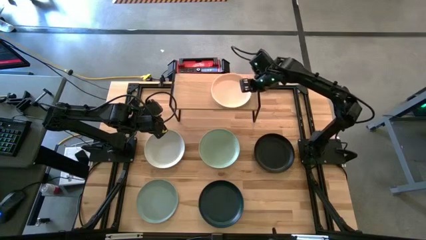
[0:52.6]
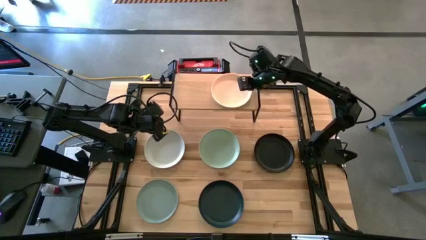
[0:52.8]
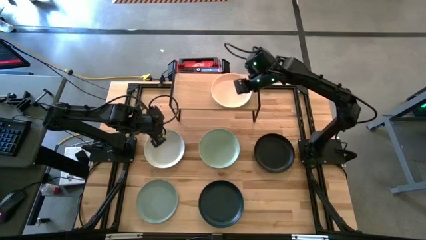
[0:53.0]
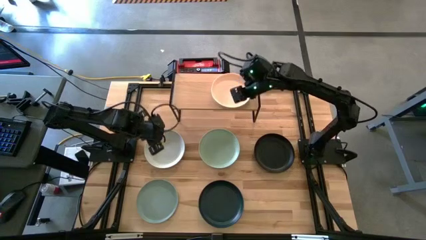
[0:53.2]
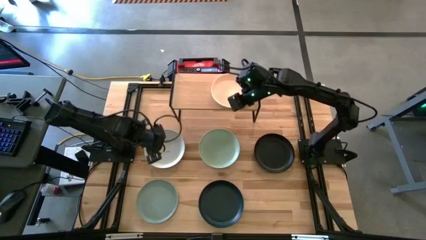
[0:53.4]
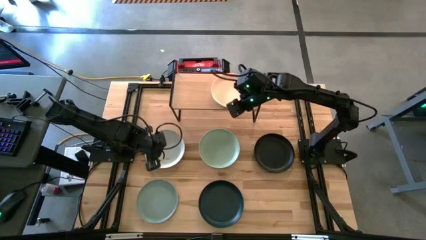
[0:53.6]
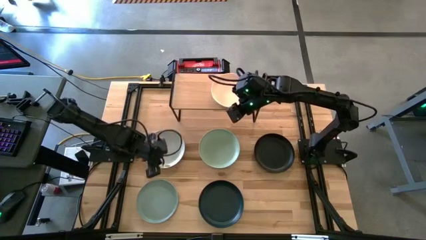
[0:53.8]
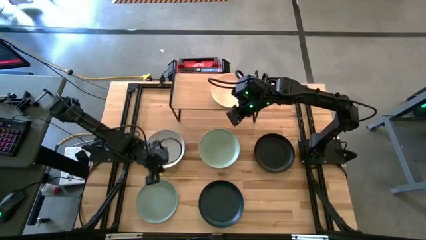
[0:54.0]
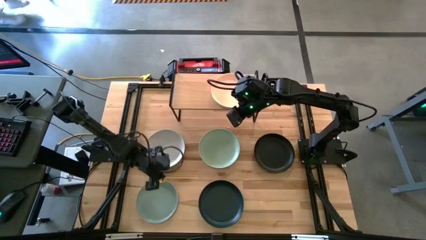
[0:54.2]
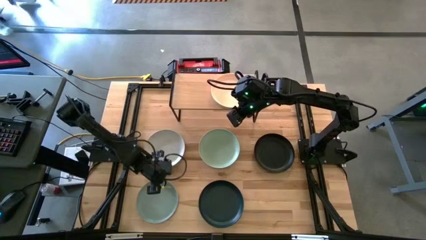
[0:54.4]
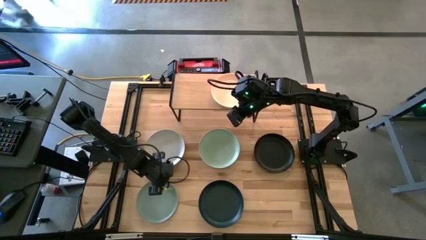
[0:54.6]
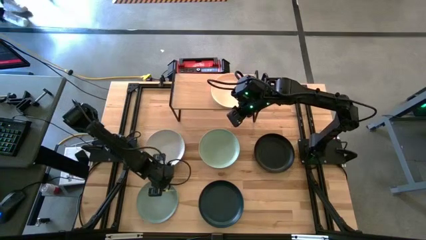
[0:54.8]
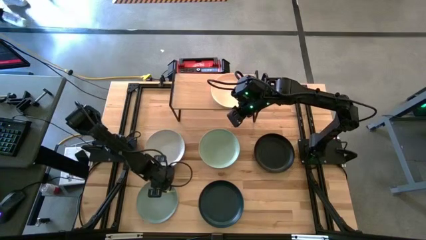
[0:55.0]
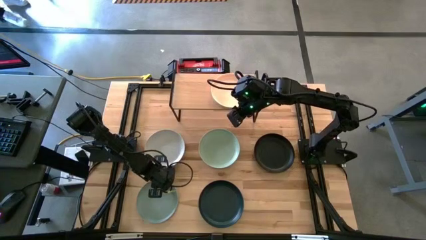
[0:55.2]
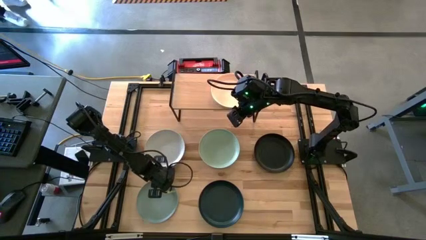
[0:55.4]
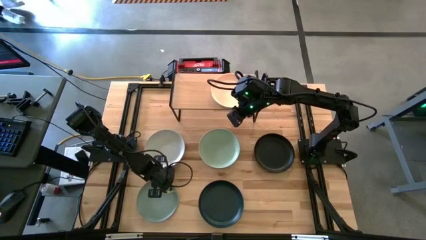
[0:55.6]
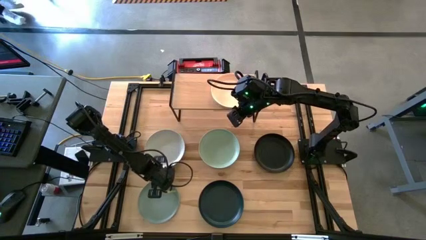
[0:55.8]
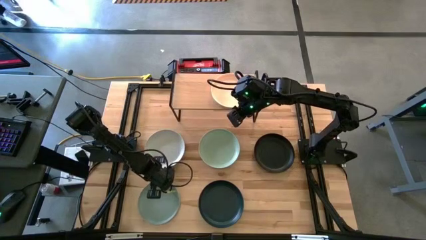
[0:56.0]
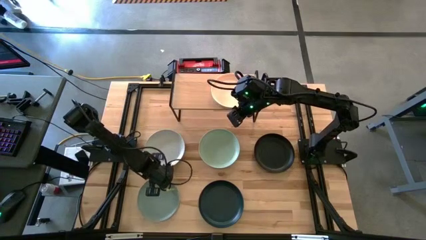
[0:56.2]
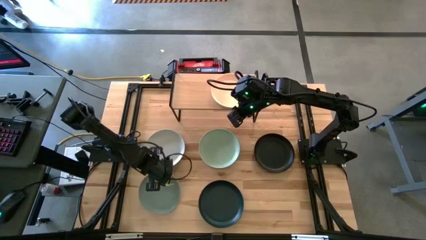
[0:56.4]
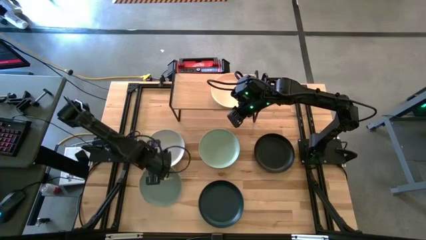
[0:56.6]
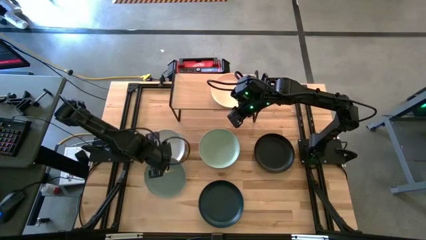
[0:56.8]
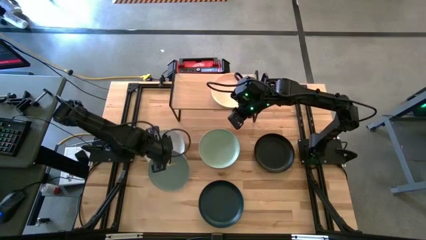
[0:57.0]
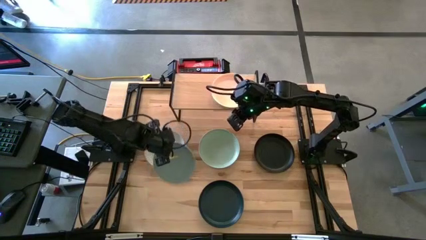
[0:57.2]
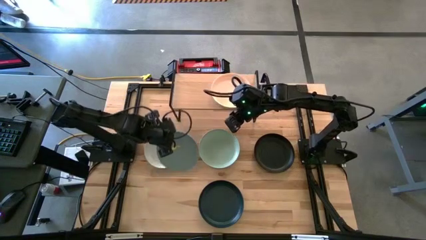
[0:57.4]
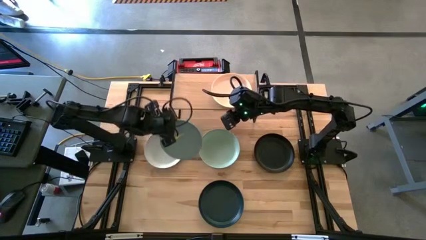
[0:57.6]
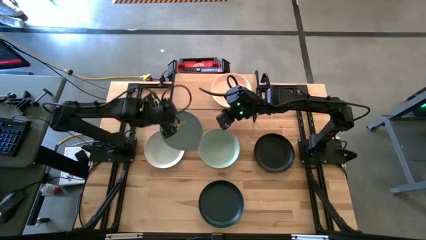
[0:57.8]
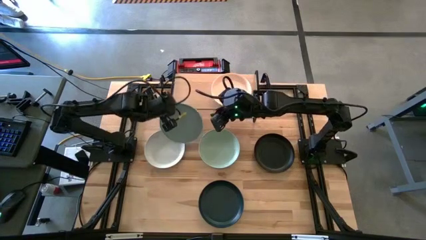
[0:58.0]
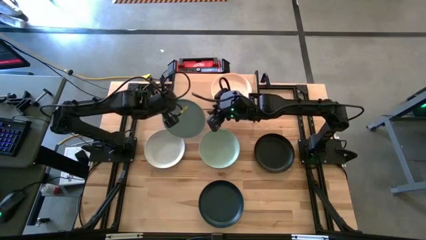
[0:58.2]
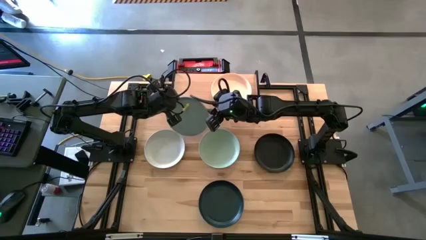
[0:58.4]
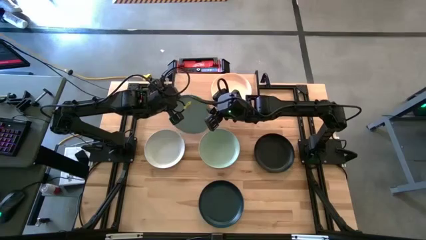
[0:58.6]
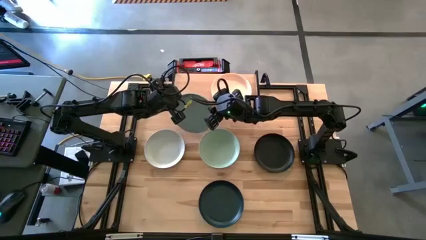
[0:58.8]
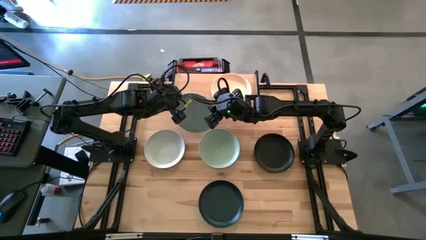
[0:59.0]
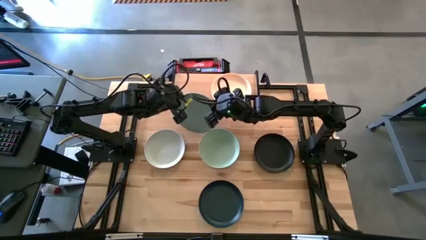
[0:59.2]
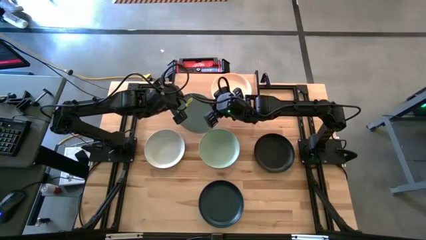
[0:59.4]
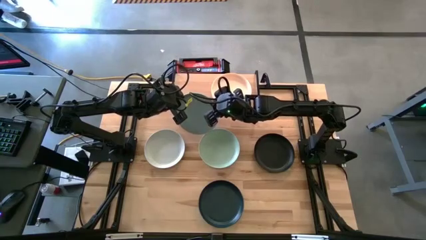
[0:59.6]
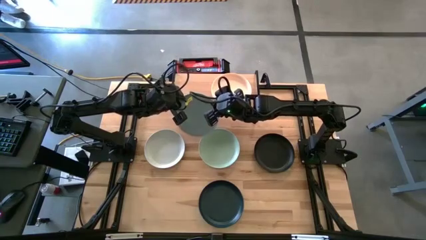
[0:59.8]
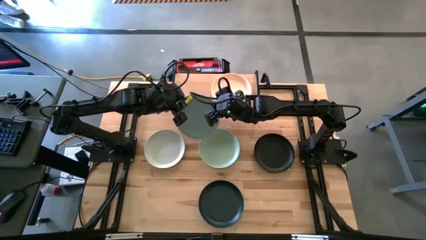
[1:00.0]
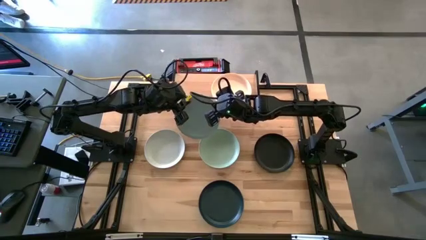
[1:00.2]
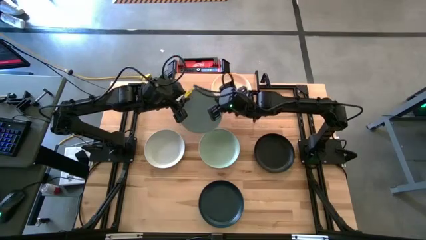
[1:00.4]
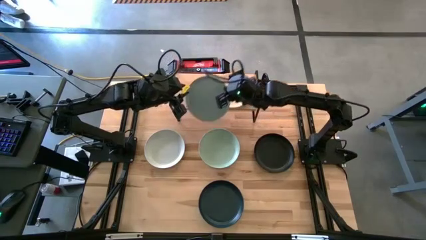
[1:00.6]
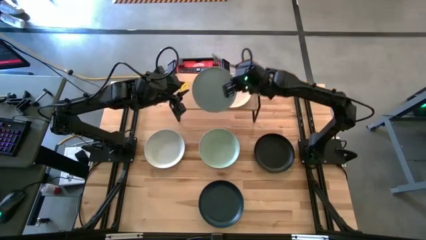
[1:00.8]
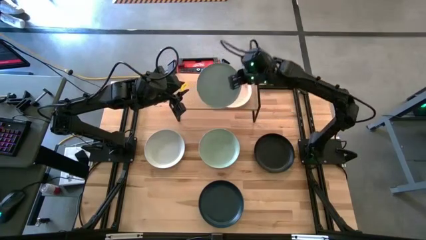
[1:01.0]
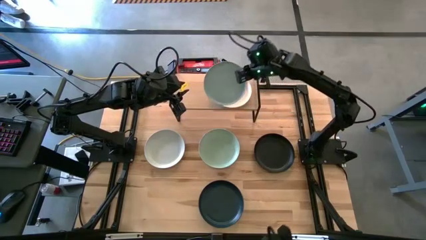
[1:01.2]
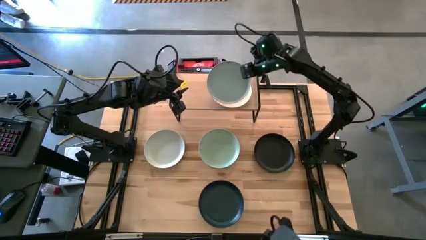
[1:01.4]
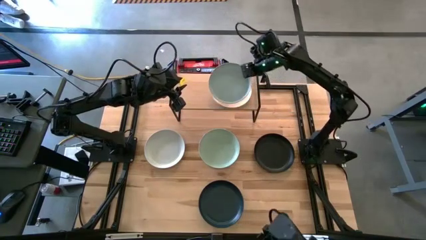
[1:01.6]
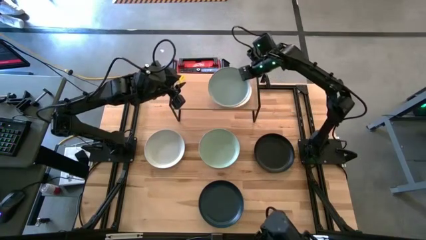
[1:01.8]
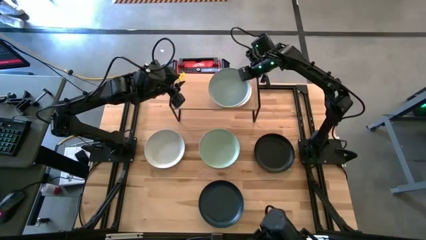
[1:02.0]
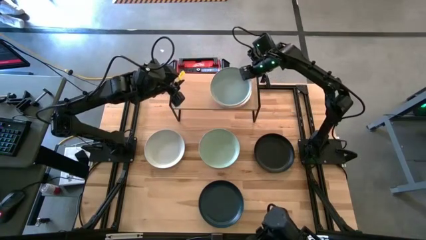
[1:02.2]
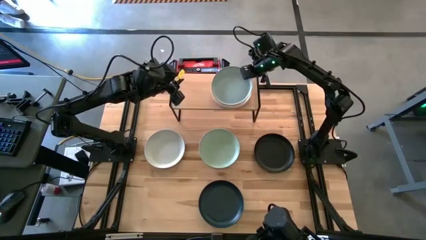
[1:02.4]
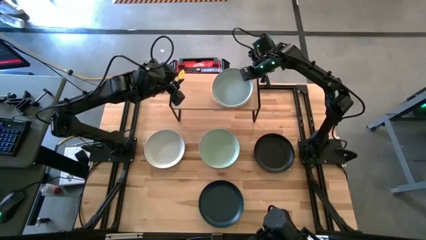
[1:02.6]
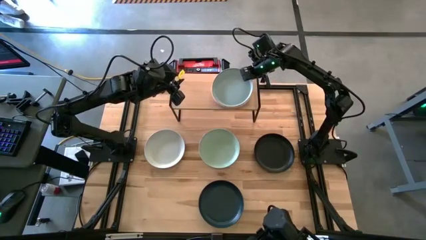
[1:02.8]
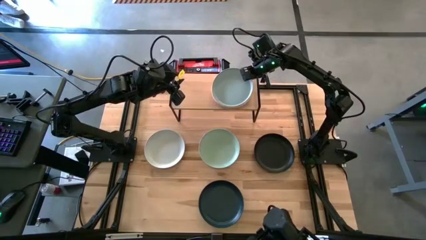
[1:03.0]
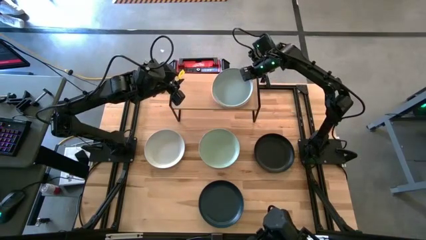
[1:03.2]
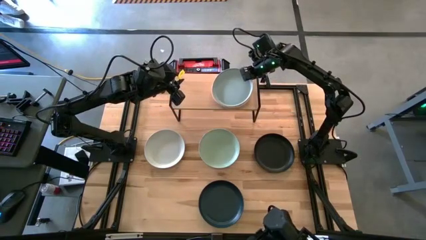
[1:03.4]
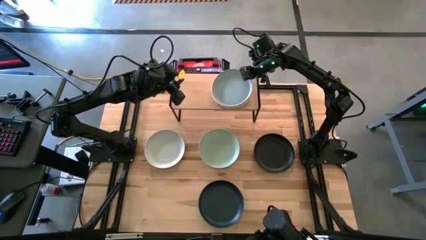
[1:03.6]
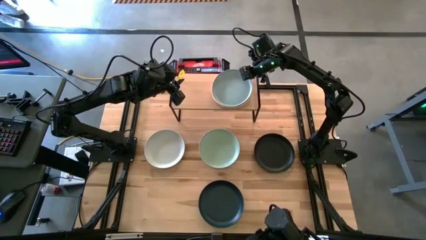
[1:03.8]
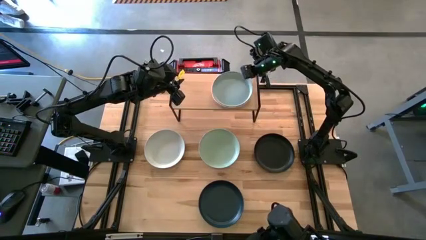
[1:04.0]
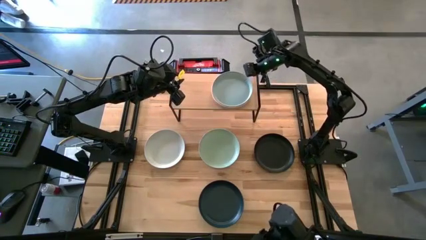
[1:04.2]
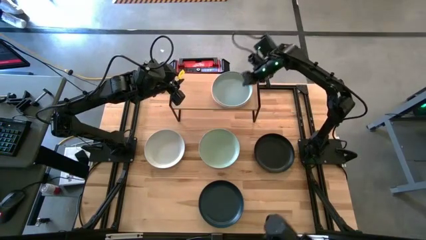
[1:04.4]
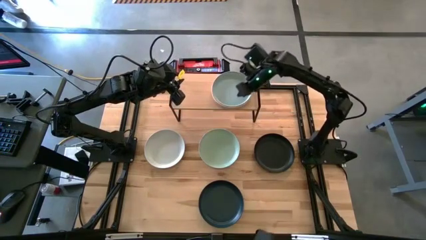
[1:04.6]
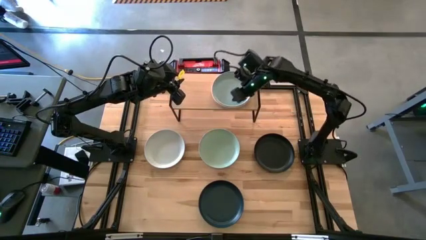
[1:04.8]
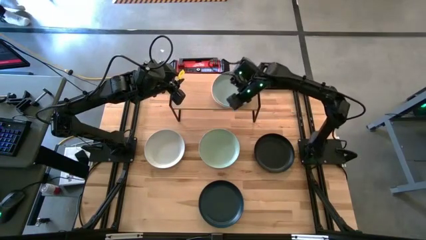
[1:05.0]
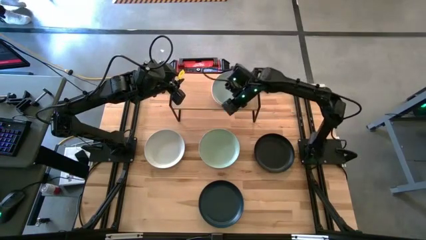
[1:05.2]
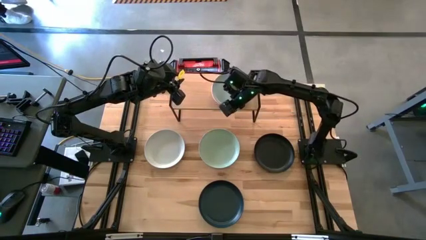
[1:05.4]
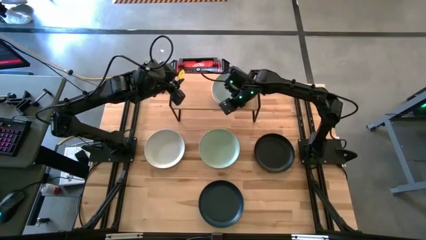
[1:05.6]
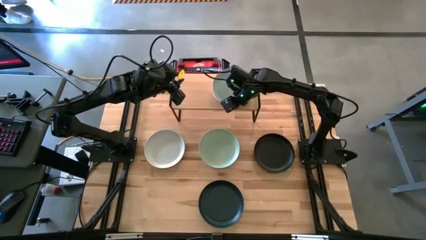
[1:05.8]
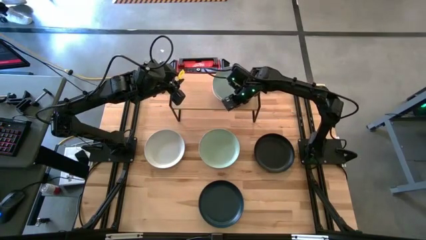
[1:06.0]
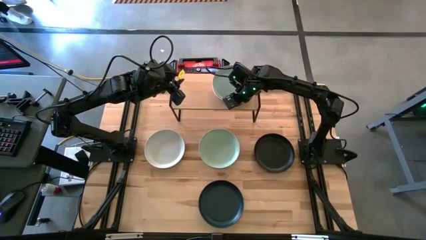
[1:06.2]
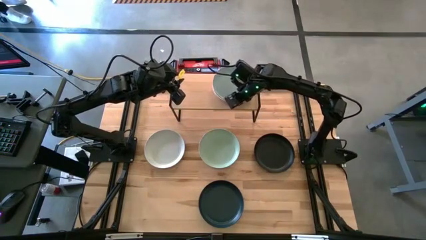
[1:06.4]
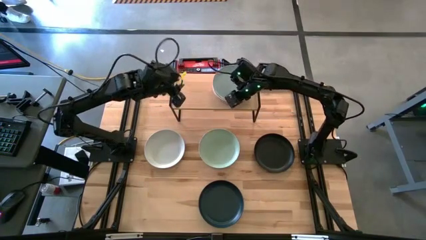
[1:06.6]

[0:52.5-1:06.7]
Task: Place and stack plates onto a shelf
Stack the green plate on top of the light orange plate on the shelf

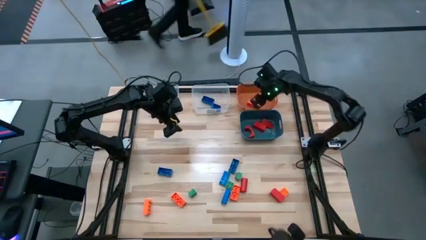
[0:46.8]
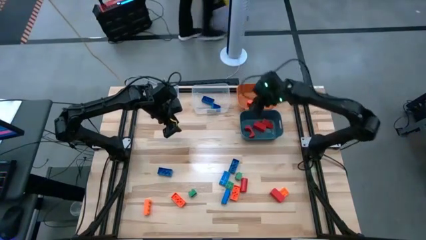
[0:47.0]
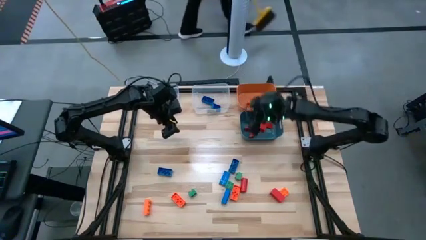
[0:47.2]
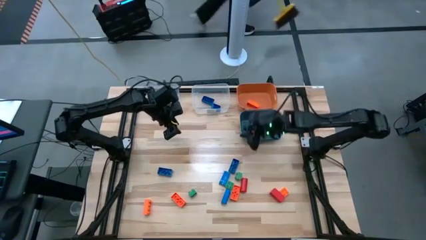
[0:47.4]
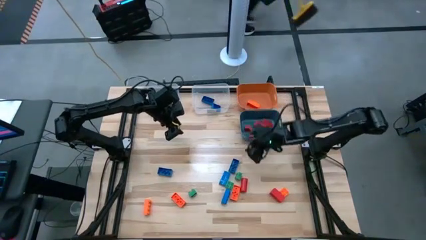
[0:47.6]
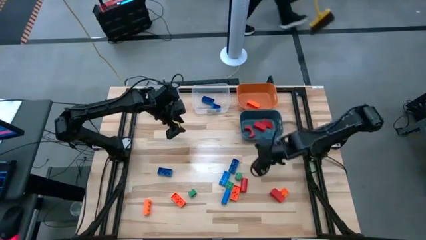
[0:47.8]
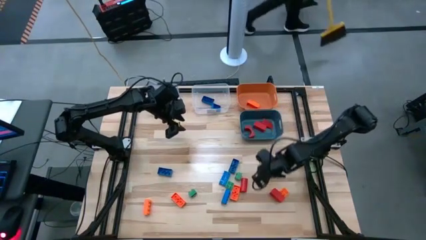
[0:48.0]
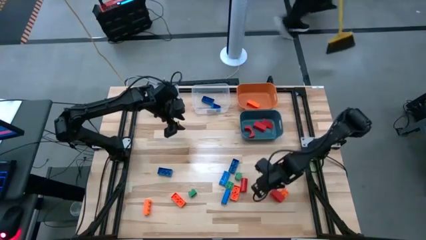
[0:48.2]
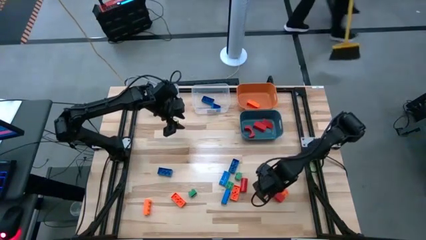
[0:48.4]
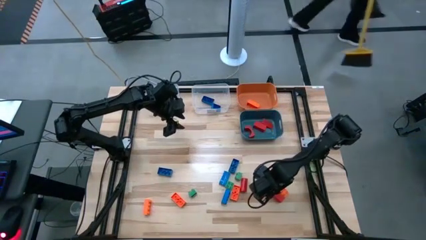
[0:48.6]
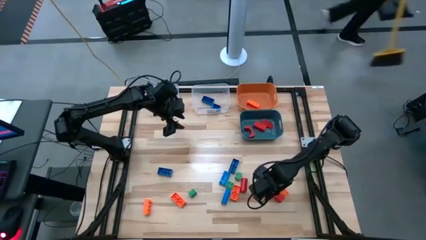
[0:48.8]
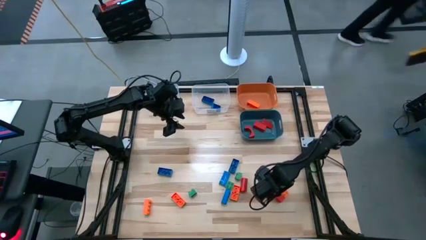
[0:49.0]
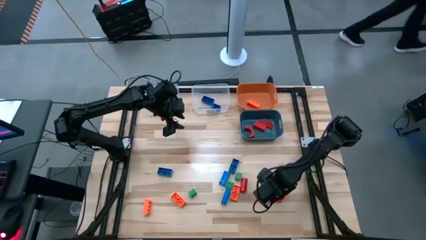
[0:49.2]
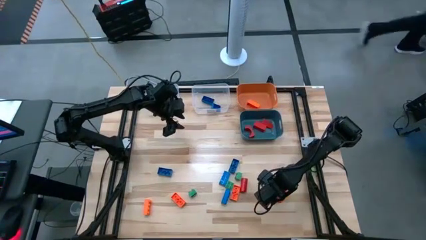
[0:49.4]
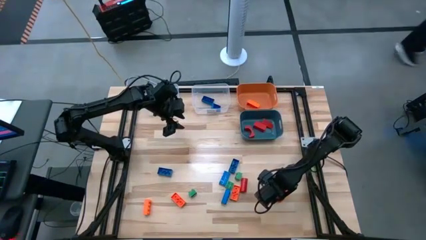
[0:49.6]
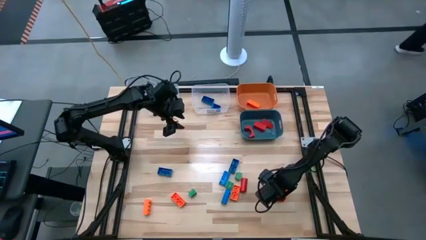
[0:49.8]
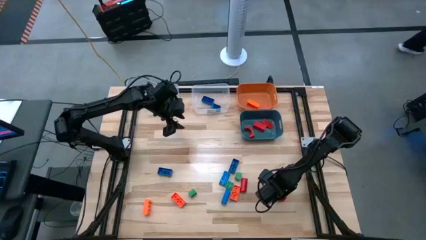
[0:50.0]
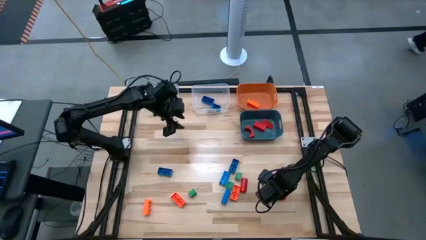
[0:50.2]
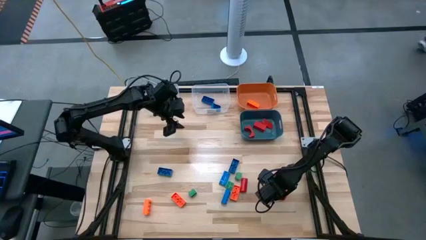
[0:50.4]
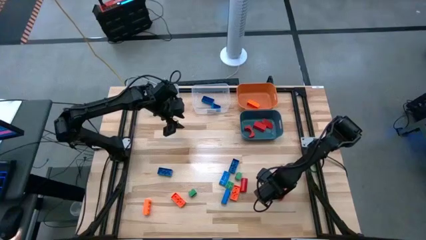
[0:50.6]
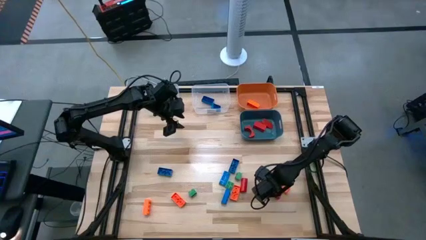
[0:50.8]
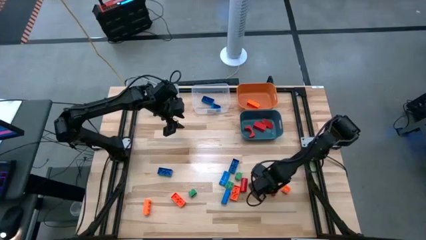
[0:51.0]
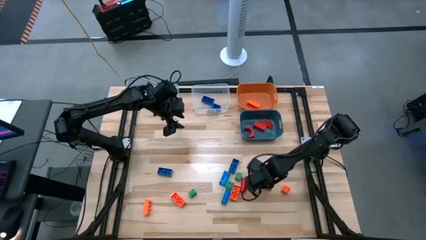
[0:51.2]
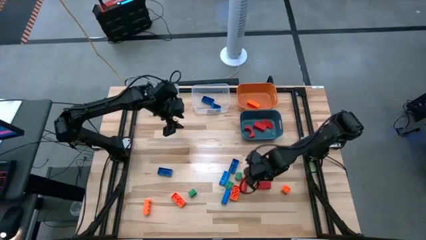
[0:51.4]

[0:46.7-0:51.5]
Task: Sort blocks
Put the red block into the blue bin
